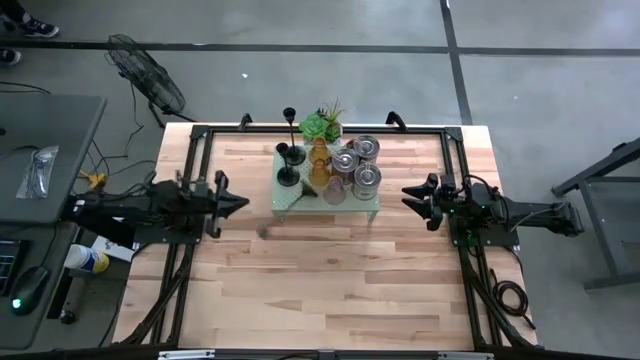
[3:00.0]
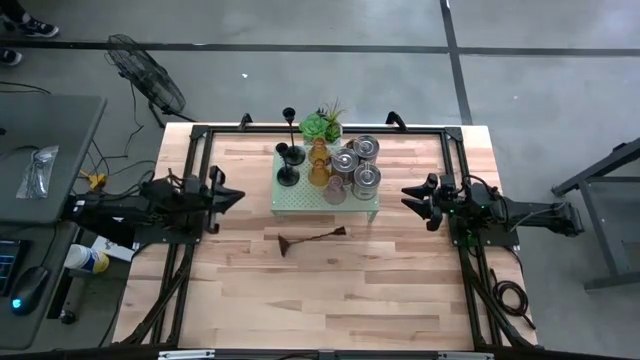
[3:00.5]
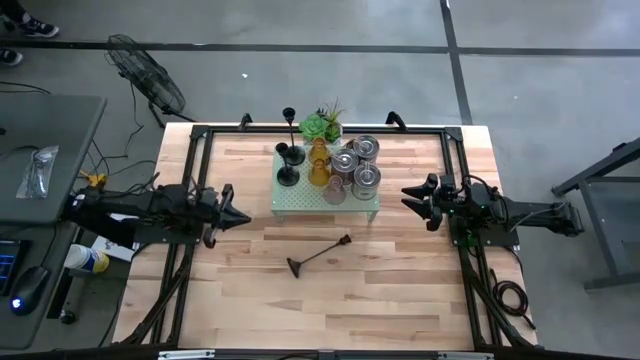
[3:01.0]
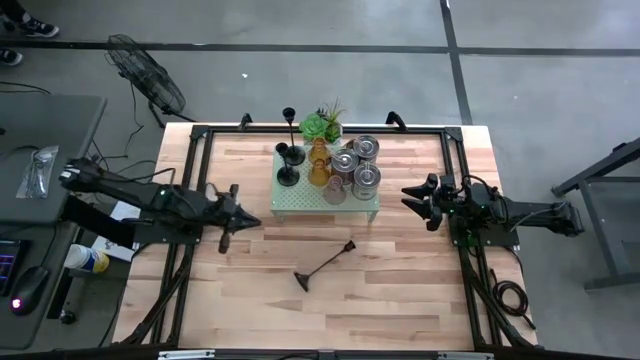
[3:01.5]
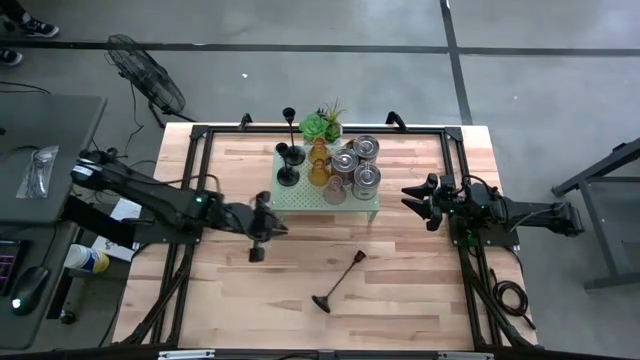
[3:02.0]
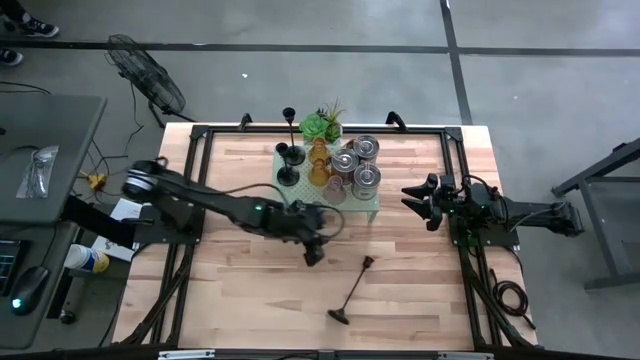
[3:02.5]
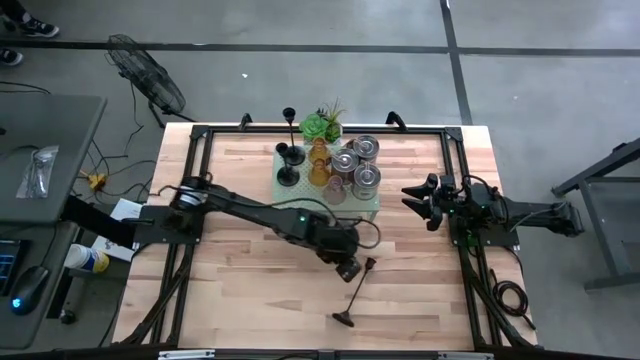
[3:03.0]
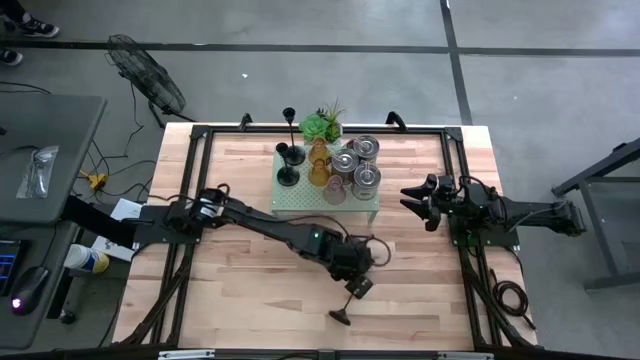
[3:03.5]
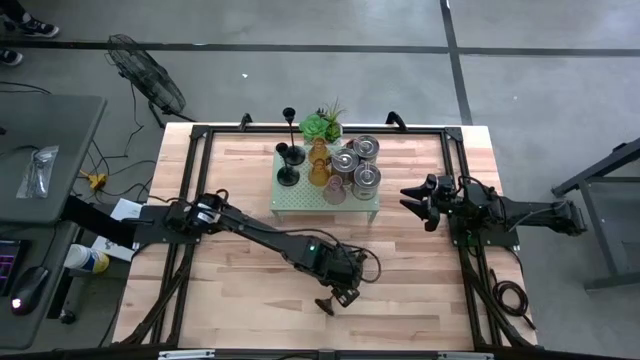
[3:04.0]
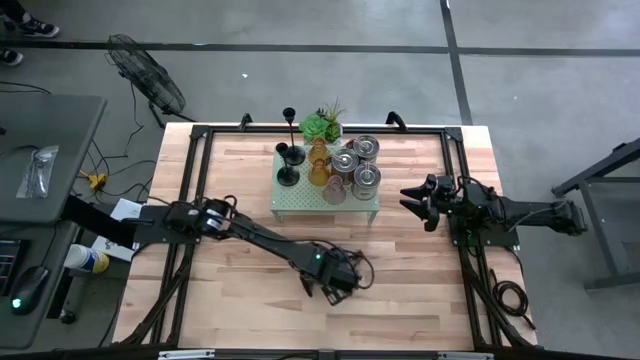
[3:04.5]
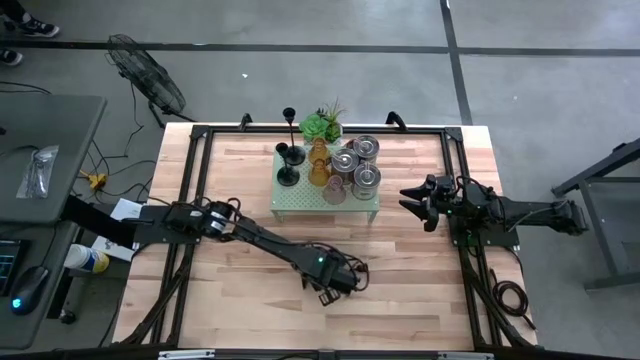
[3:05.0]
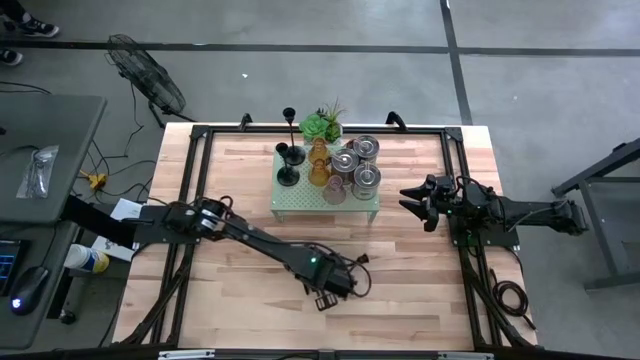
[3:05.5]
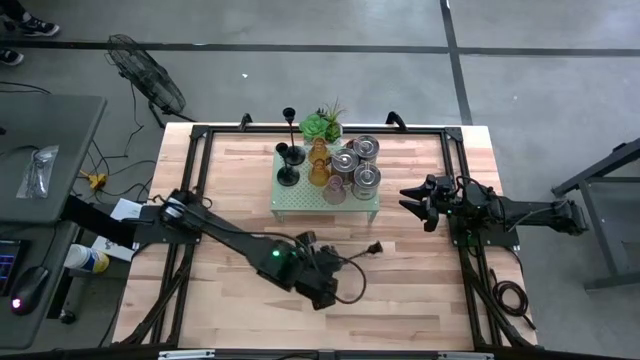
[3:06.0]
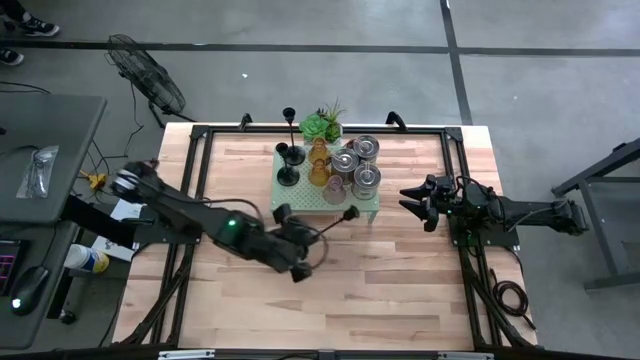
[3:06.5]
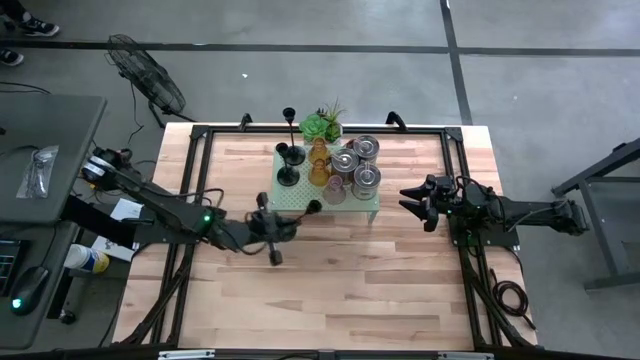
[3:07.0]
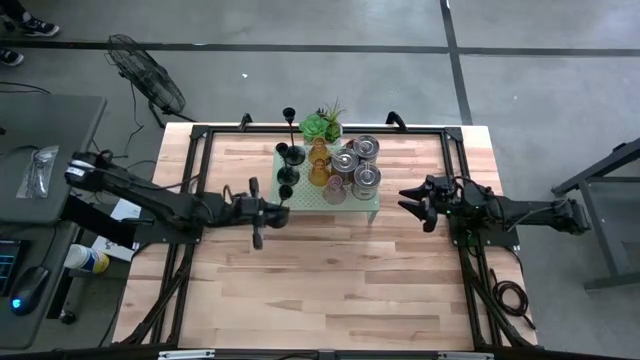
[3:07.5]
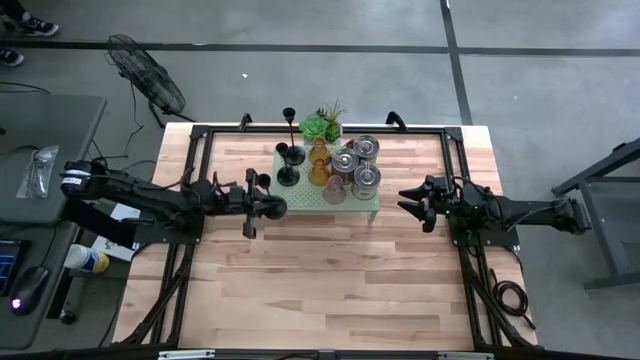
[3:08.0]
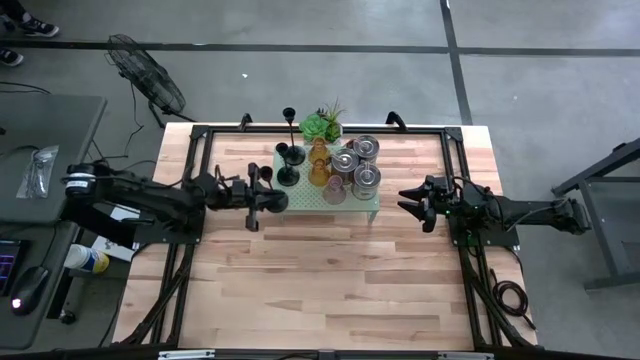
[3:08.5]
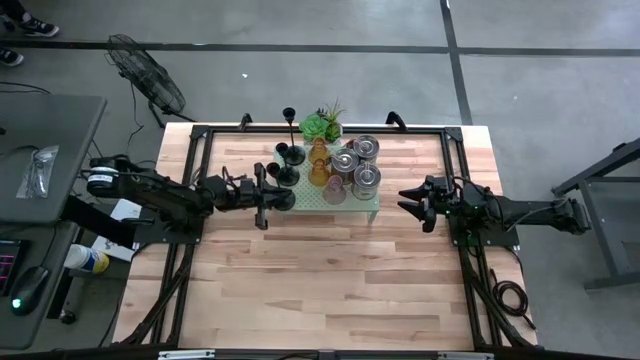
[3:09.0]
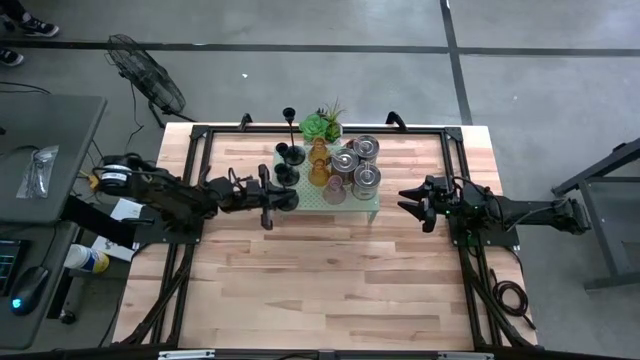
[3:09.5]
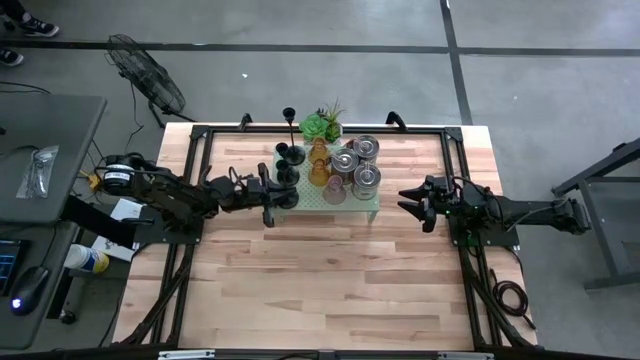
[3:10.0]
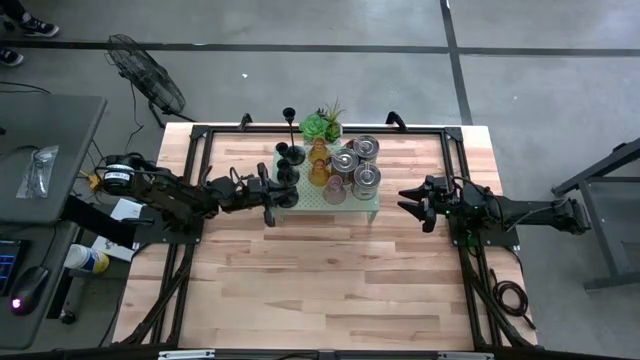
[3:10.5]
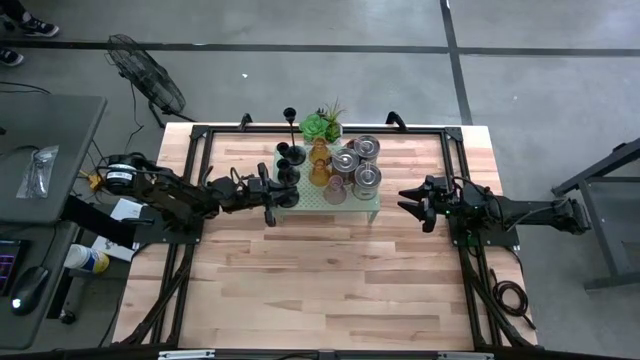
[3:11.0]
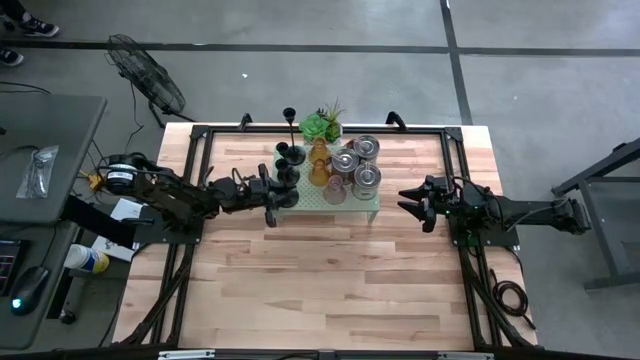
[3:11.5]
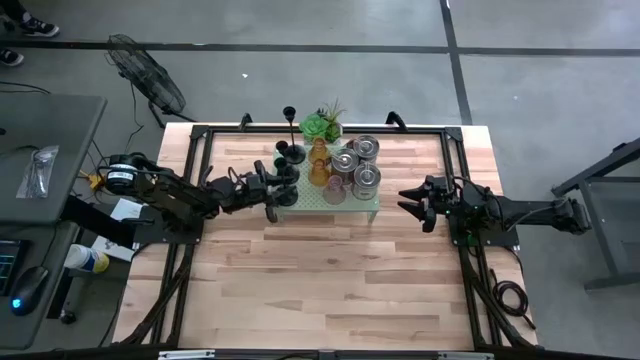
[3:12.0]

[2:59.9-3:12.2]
Task: Pick & Place candle stick holders
Put the black candle holder on the shelf

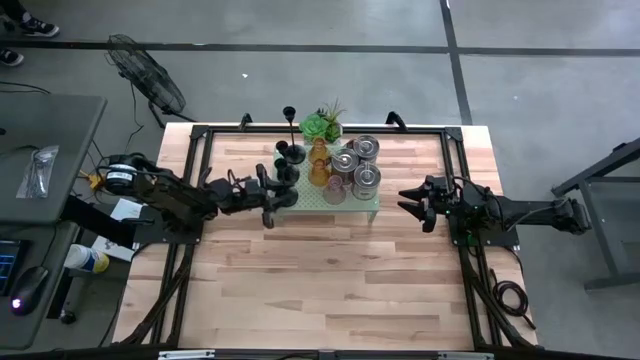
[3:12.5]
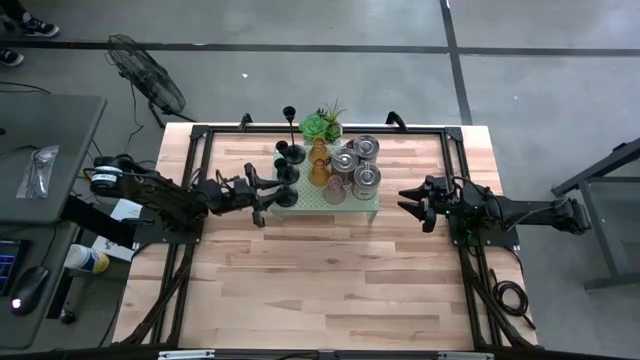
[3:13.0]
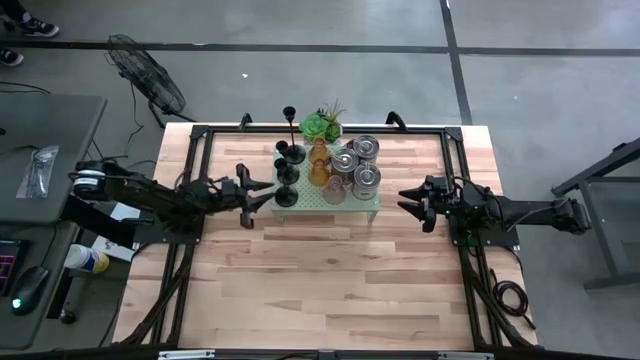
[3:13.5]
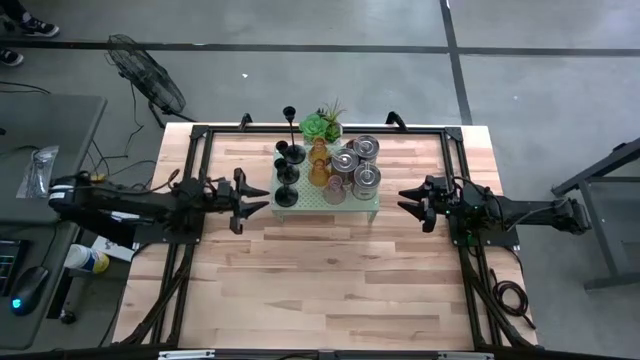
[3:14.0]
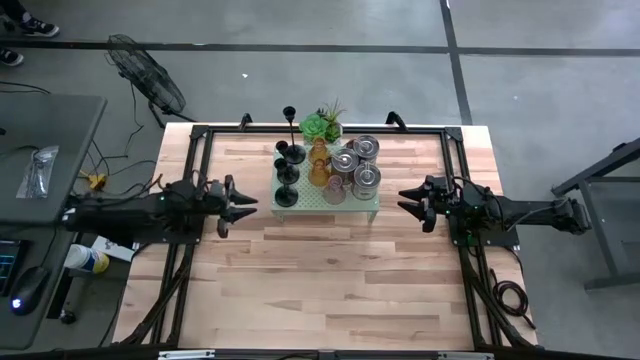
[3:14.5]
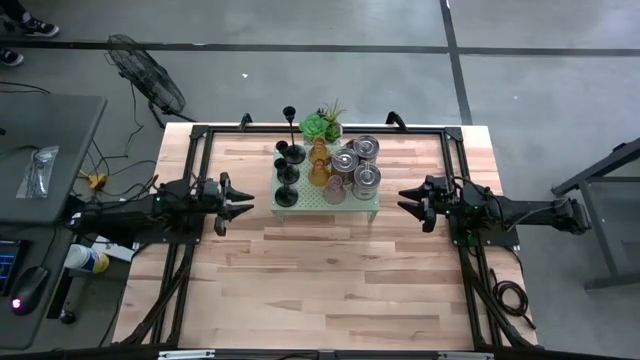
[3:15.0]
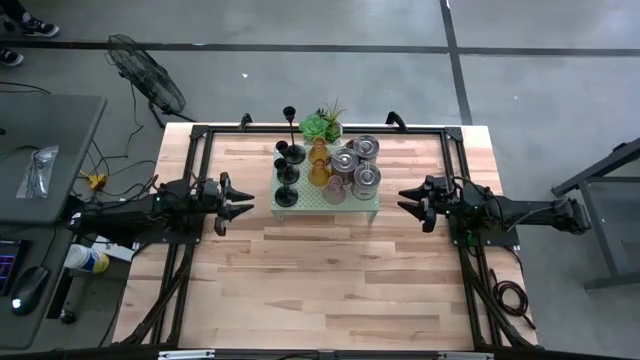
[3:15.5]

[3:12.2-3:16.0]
Return to Home Position

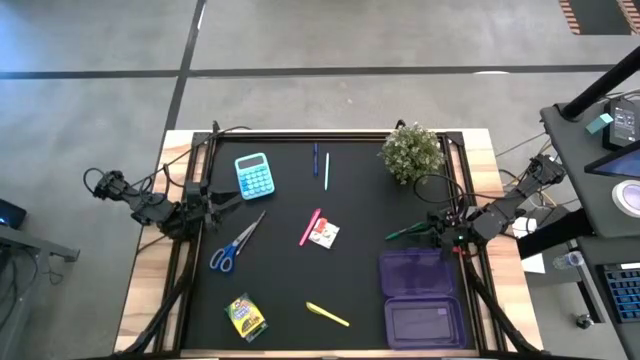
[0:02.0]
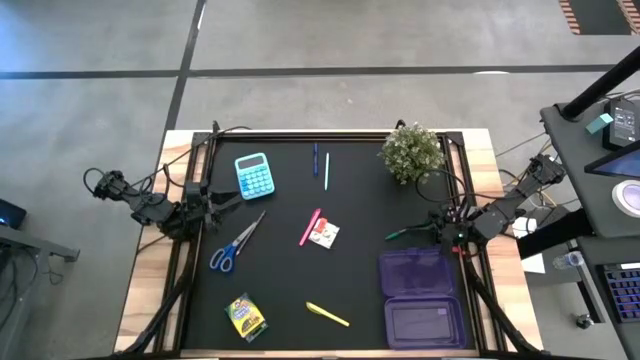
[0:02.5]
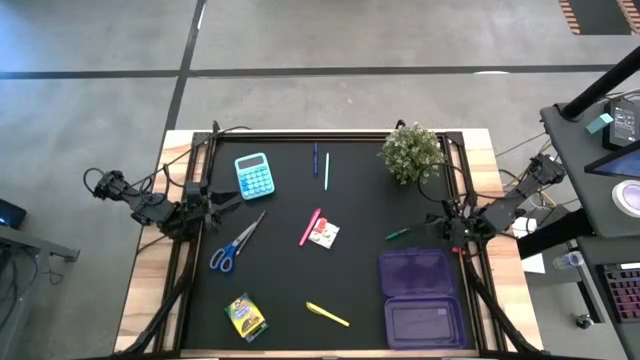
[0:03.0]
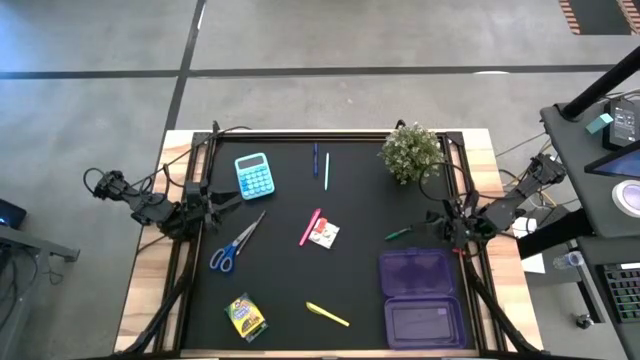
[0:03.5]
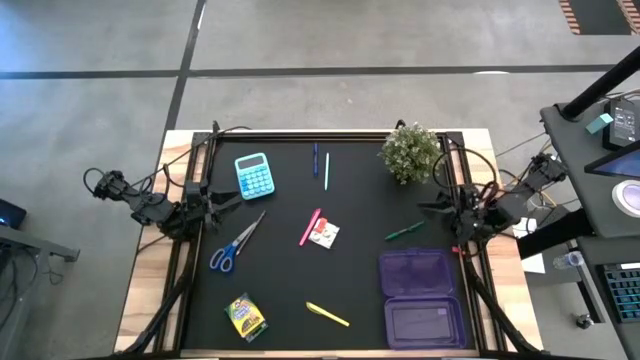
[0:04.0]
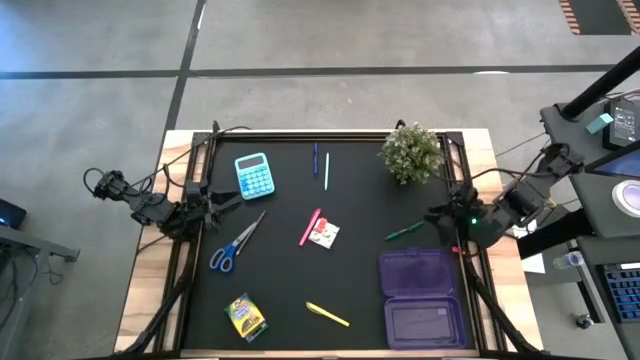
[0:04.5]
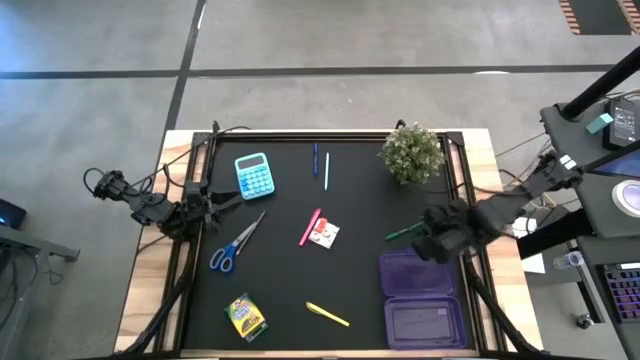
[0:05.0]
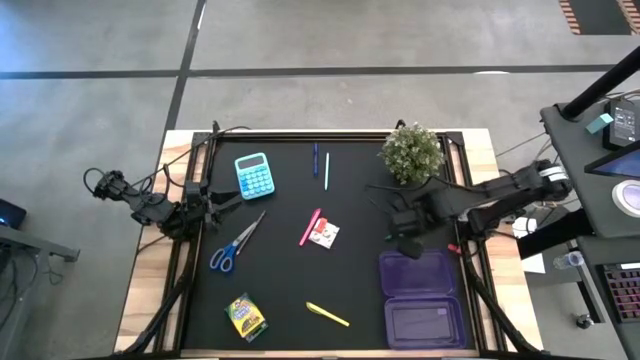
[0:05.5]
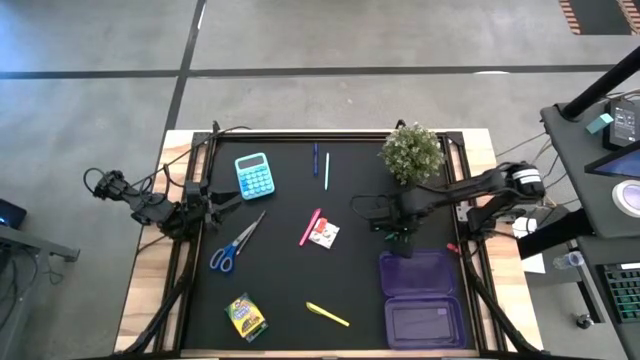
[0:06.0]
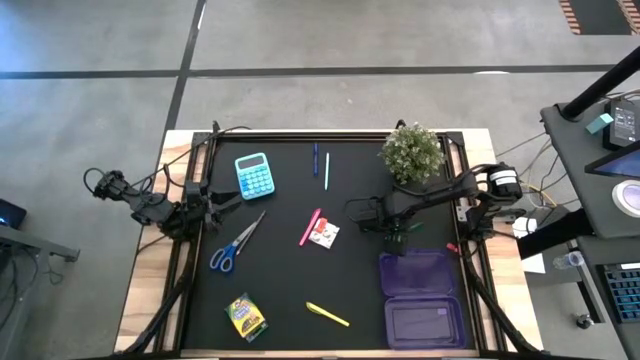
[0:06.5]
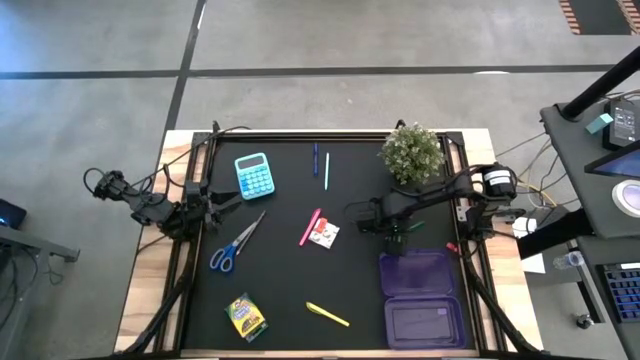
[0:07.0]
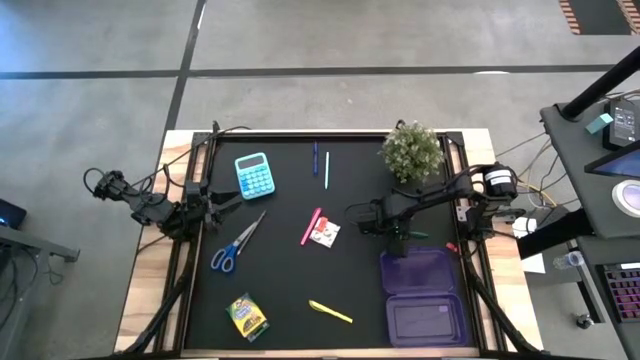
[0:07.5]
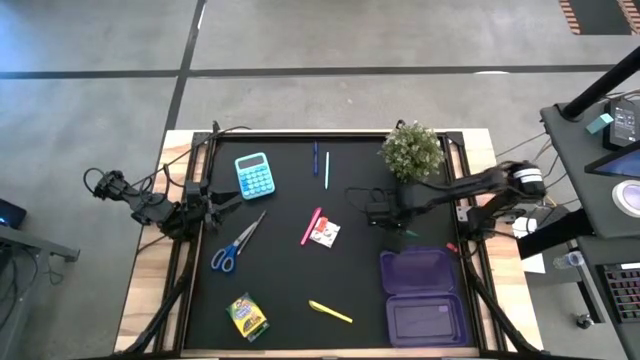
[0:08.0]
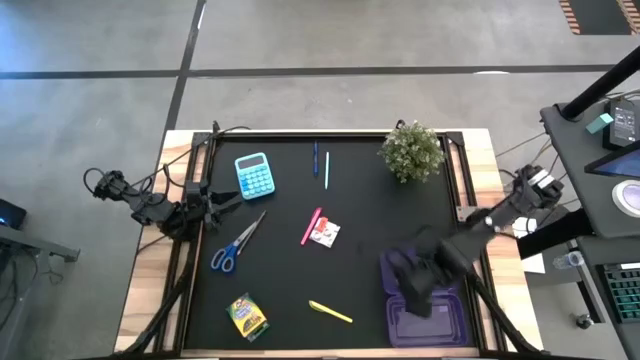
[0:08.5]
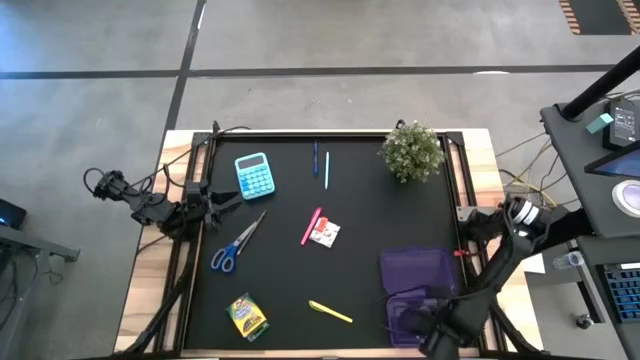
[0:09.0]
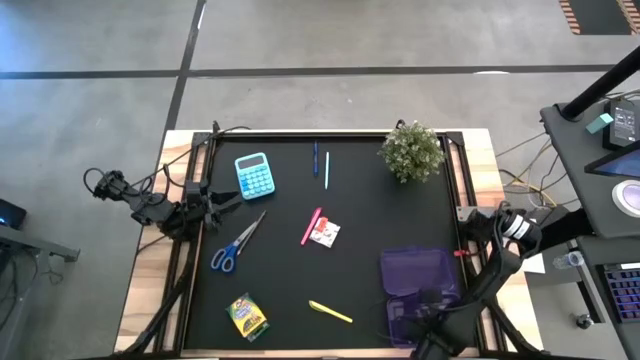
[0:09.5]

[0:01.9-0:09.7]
Task: Pack school essentials
Put the green pen into the purple supply box
